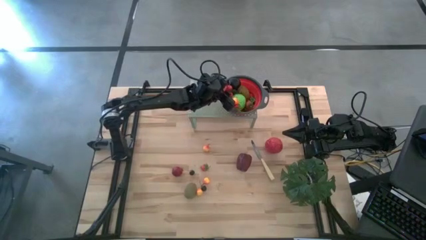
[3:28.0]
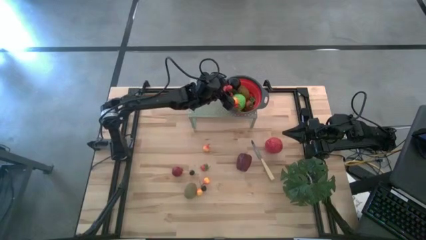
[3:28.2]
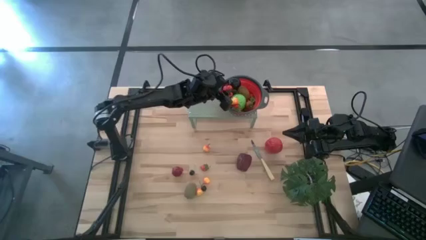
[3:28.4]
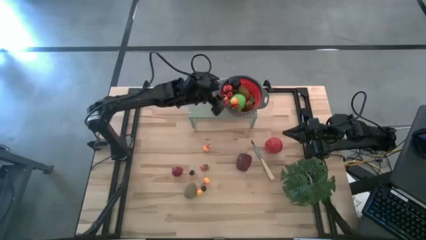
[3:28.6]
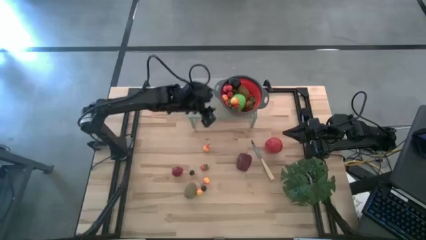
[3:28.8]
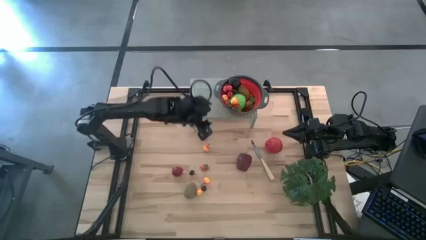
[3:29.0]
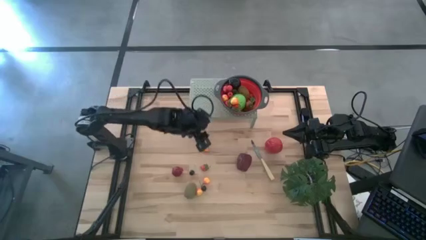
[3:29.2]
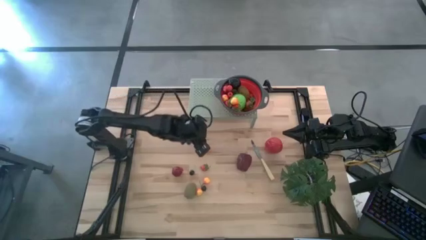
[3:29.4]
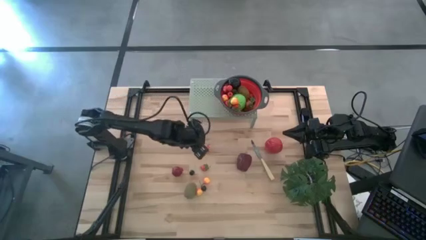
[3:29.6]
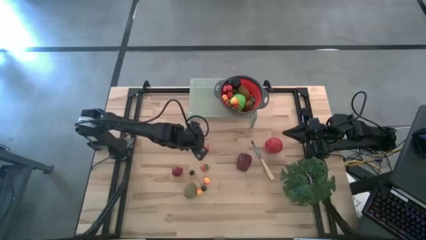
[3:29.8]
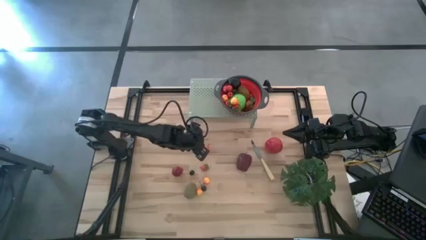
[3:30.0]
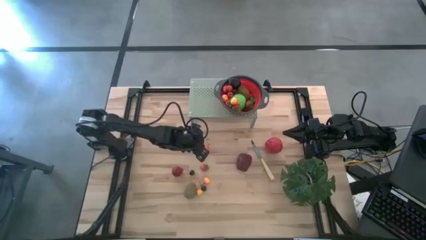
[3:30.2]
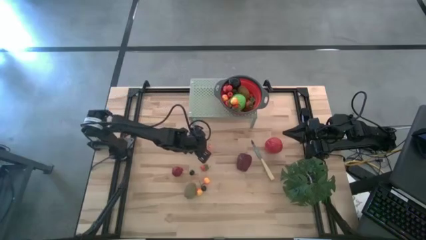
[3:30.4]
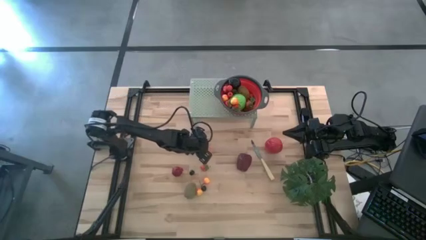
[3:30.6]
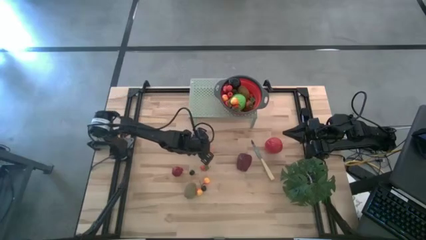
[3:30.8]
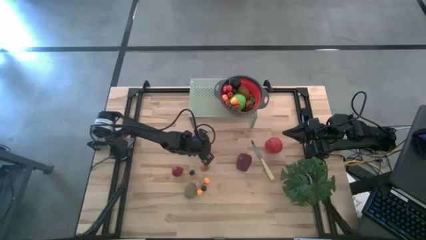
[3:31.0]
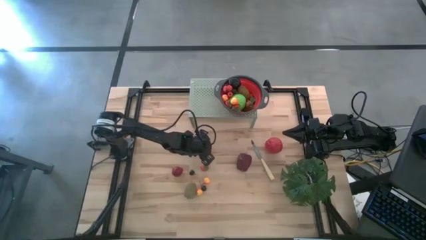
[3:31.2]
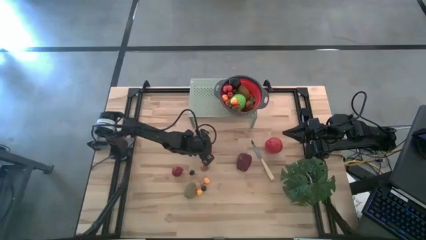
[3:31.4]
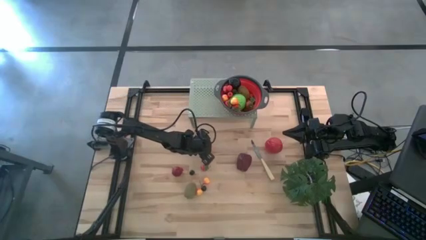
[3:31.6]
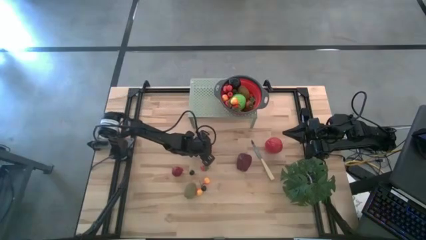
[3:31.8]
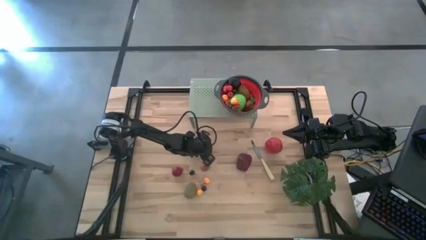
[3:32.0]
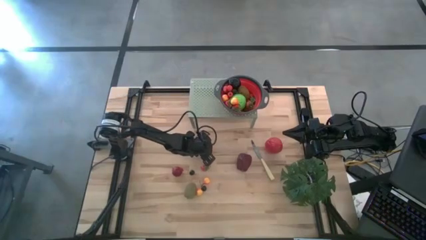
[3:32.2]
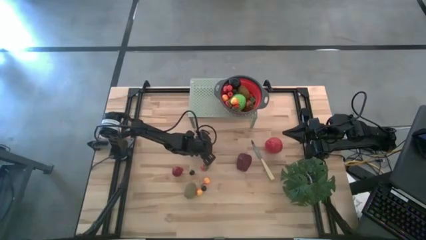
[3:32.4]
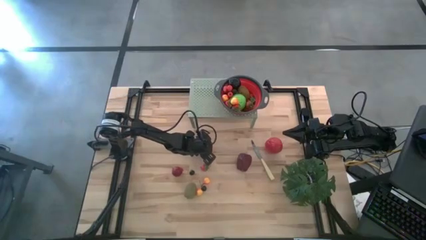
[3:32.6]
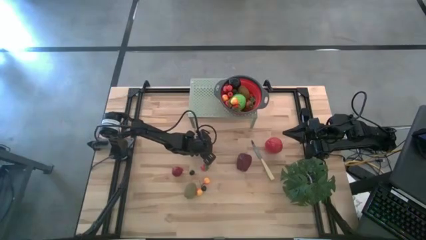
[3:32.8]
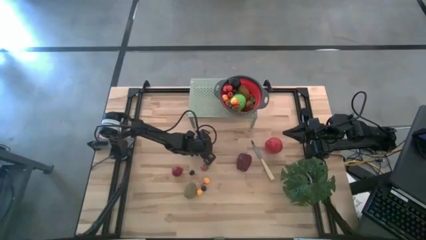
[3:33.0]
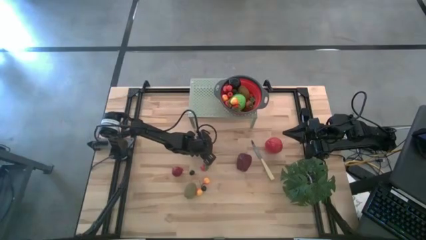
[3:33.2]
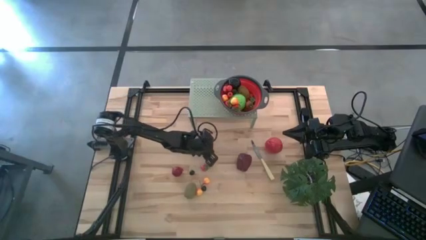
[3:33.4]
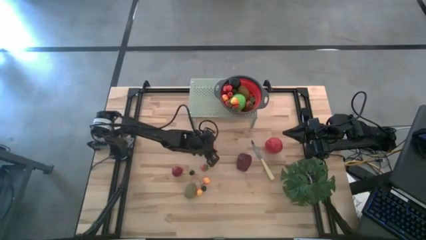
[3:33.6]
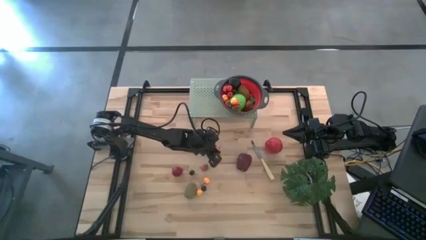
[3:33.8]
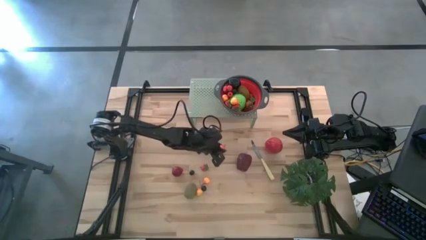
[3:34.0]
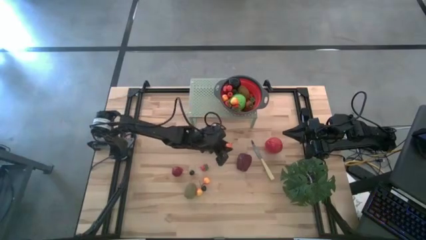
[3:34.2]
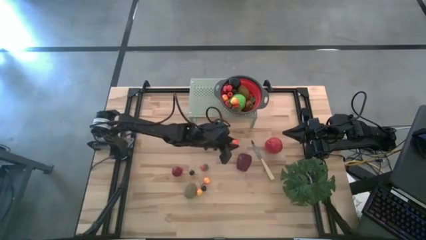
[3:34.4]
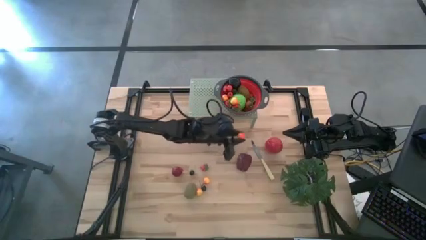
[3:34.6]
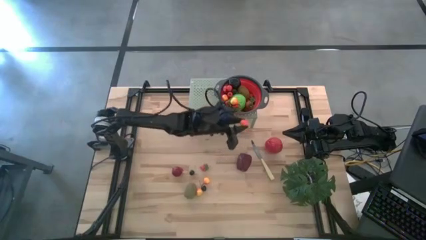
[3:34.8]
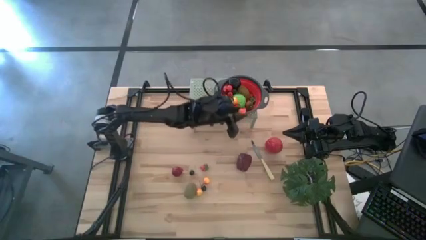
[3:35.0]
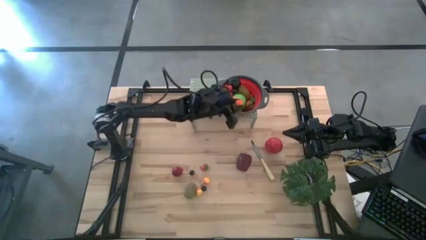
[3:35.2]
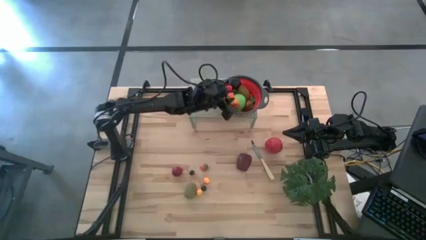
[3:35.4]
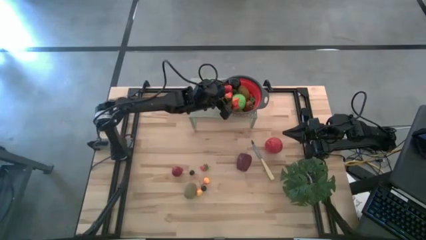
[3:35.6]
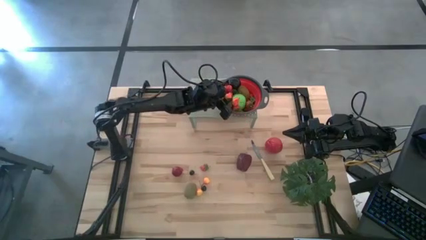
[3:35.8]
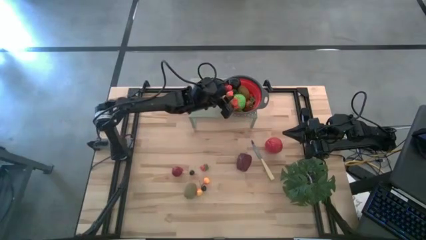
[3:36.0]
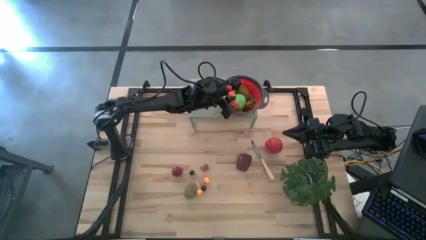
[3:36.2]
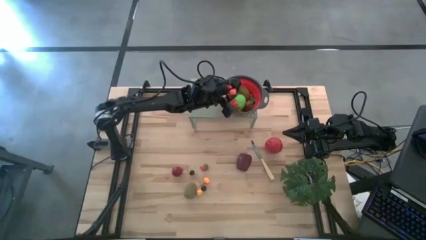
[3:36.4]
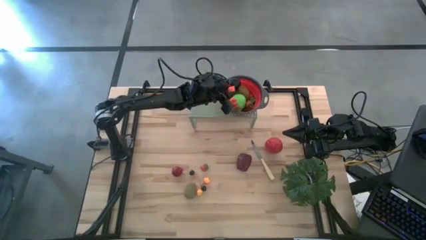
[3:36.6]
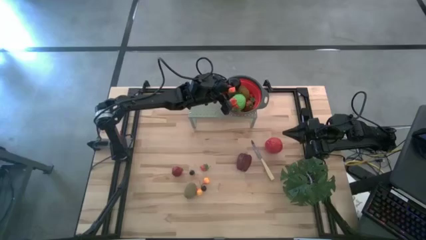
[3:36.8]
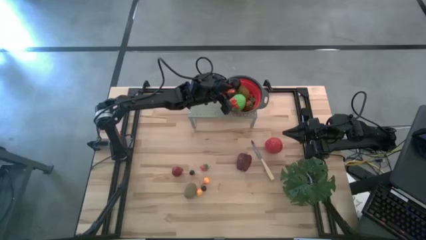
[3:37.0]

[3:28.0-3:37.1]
Task: Pick & Place Fruit
Put the orange peach into the black strainer bowl on the shelf

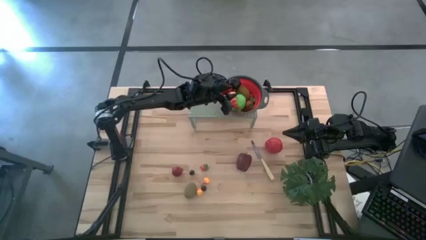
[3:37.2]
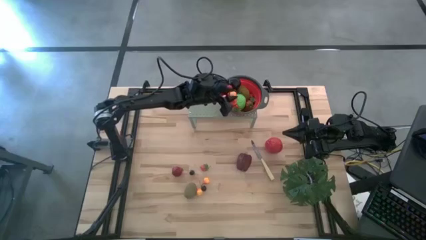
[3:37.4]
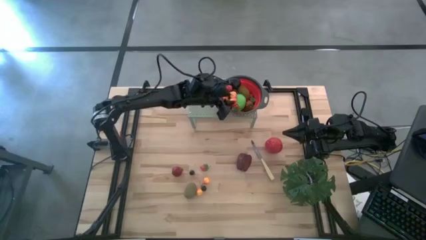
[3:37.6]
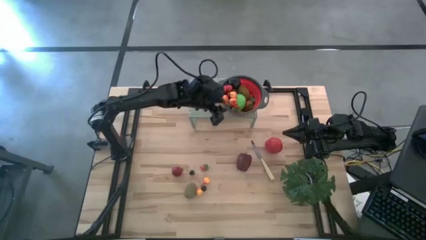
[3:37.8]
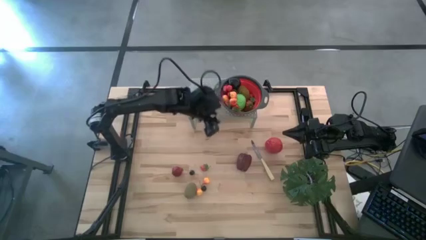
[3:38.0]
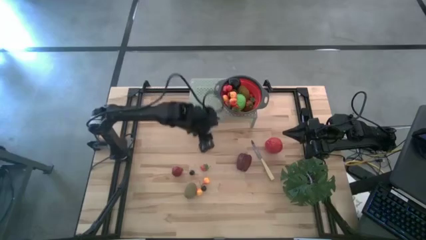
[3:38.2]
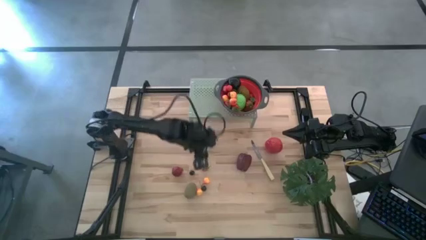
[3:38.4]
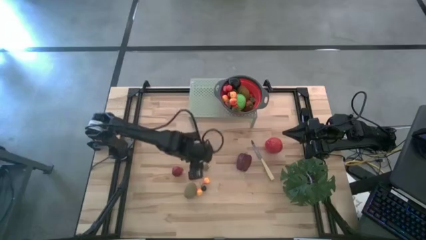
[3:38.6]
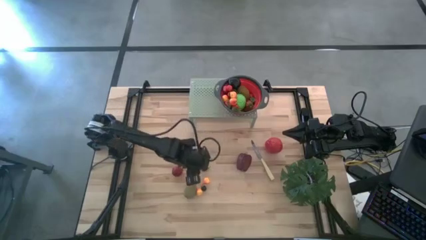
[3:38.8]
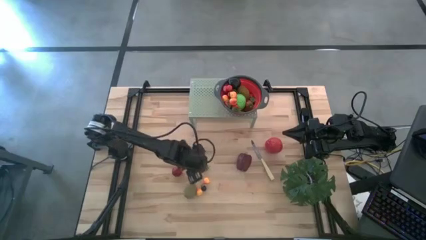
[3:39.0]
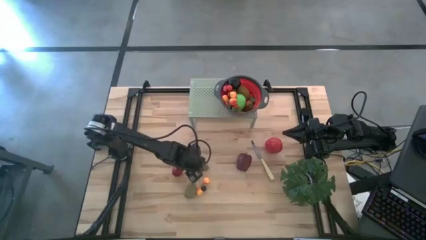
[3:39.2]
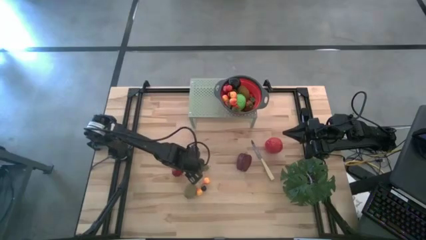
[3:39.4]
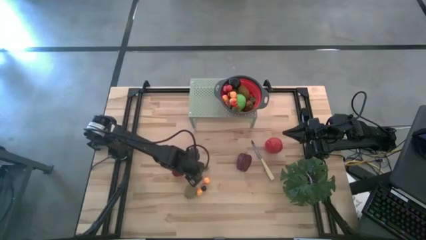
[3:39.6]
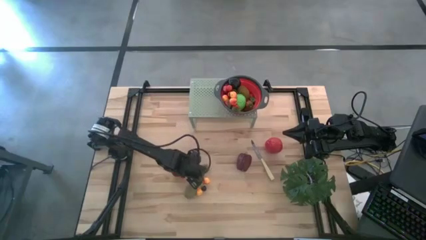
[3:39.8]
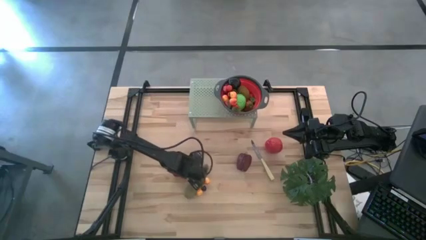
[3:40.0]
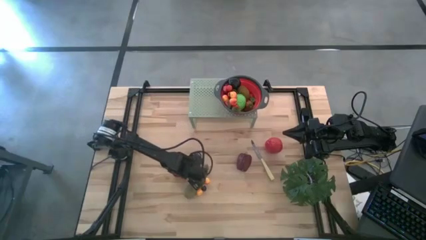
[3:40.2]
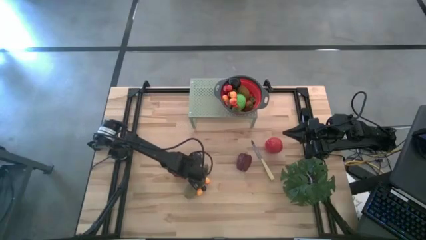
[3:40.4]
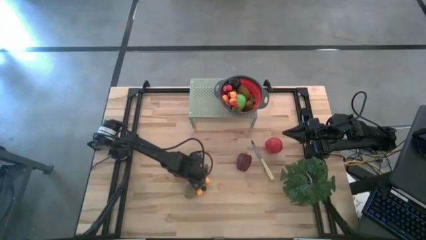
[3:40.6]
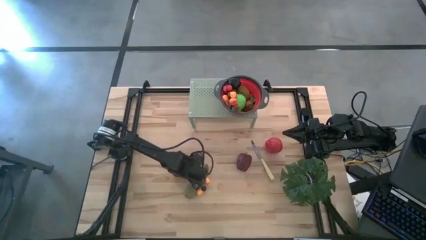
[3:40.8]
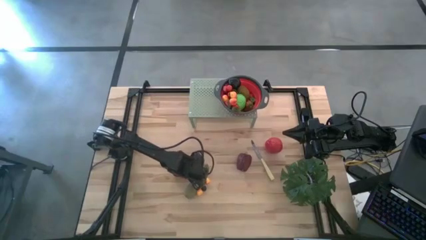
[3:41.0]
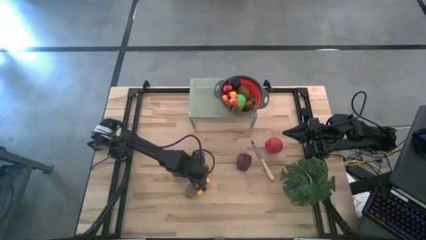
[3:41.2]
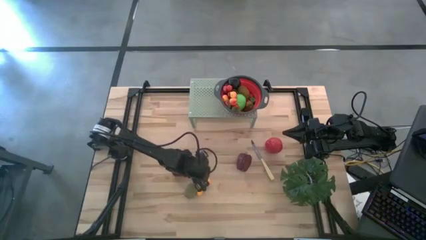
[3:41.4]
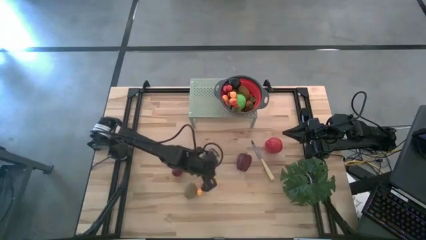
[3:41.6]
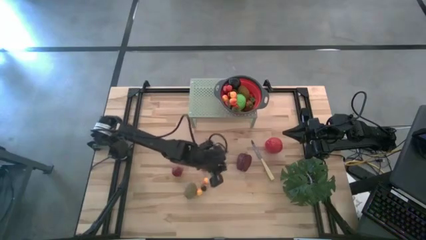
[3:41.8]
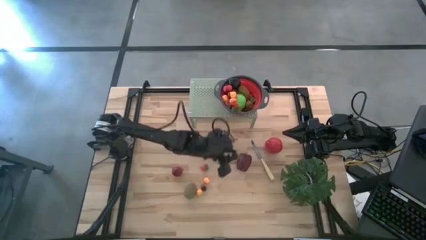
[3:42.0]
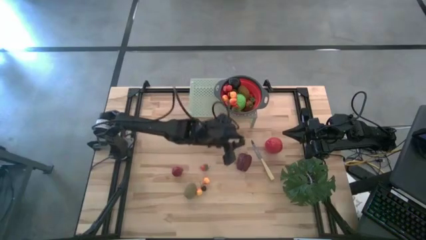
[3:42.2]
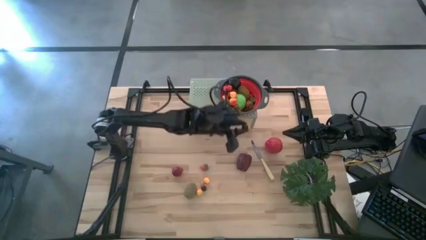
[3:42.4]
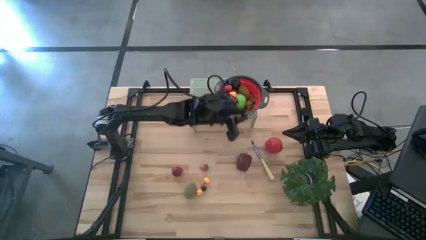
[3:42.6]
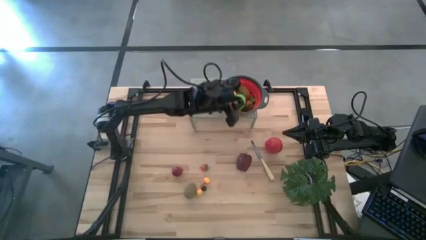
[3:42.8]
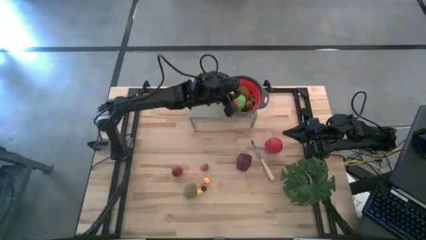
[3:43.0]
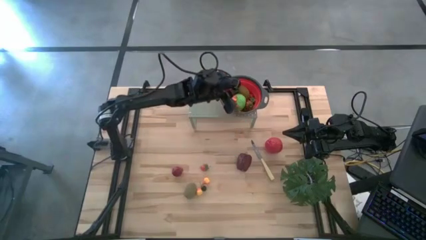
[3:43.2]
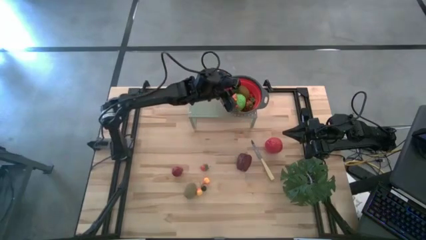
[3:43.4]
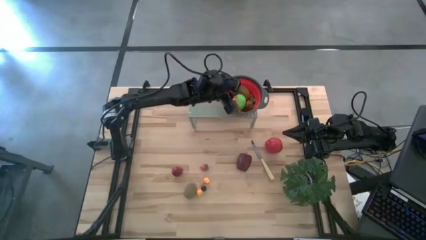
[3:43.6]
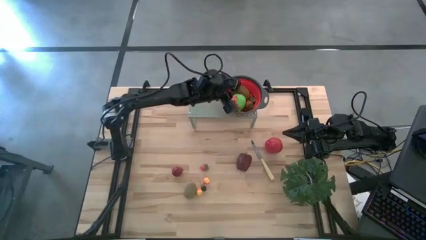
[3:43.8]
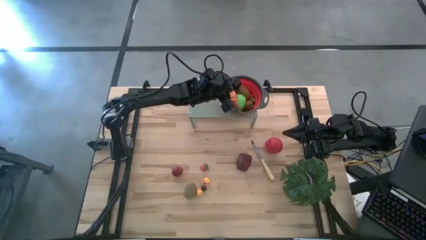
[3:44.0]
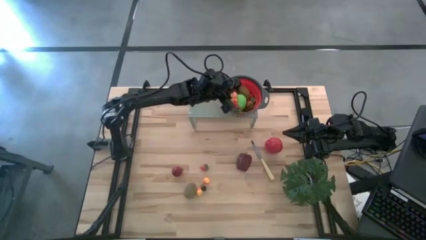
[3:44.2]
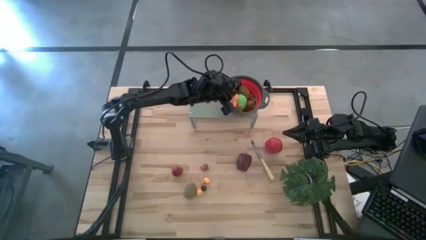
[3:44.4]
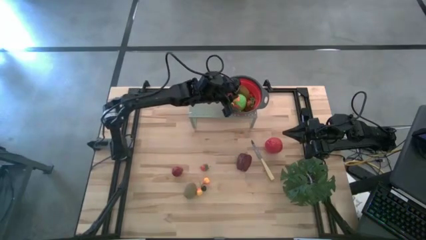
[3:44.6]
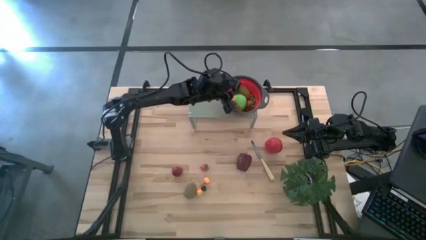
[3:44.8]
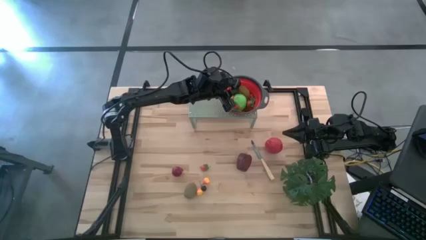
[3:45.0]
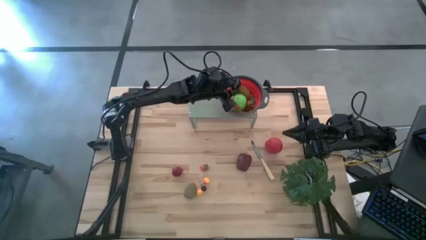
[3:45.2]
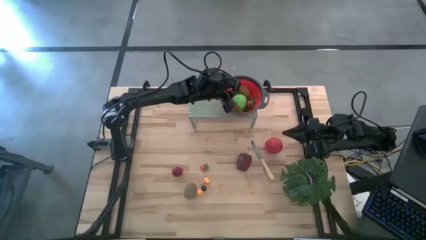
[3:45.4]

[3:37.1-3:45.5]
Put the black cherry into the black strainer bowl on the shelf
